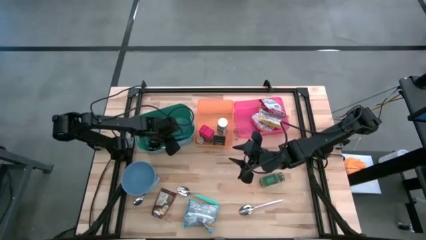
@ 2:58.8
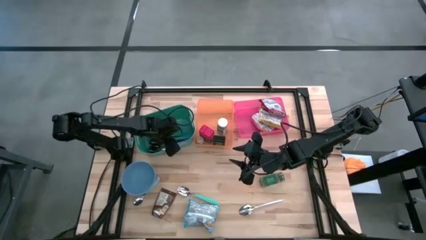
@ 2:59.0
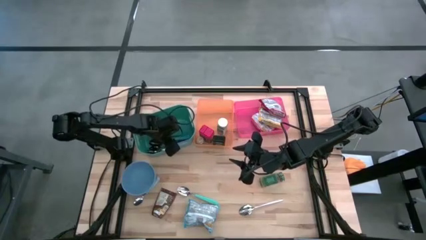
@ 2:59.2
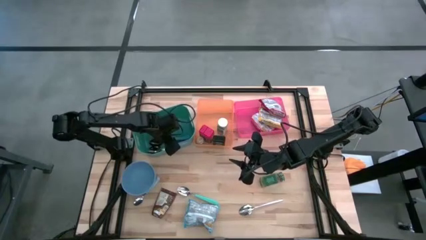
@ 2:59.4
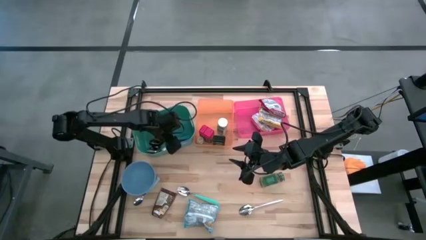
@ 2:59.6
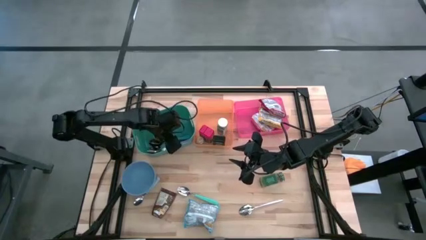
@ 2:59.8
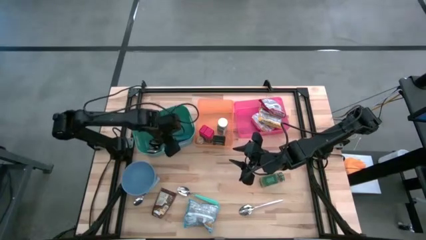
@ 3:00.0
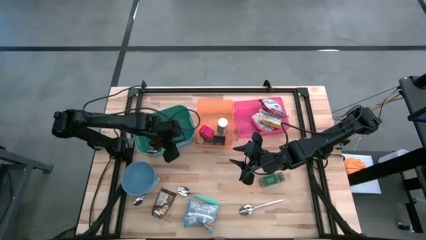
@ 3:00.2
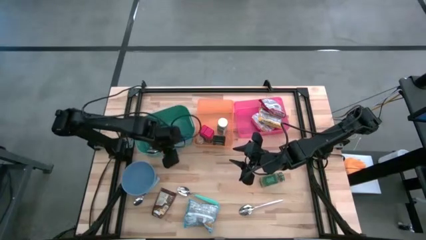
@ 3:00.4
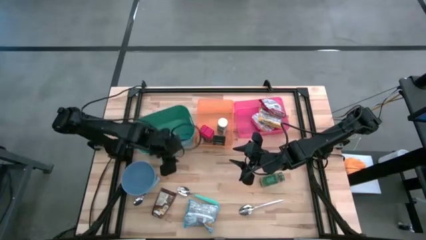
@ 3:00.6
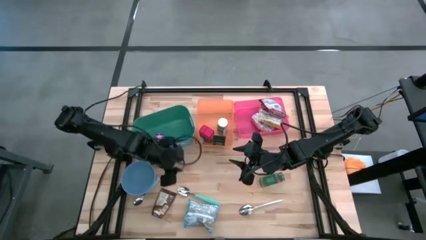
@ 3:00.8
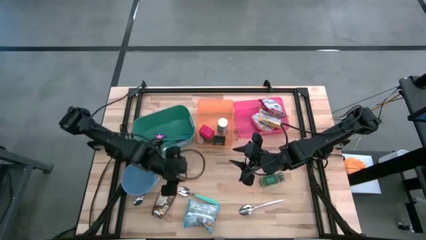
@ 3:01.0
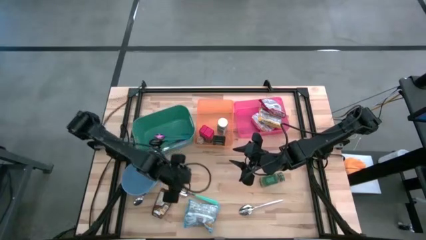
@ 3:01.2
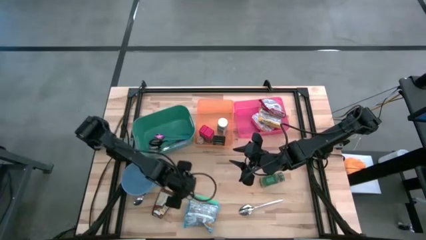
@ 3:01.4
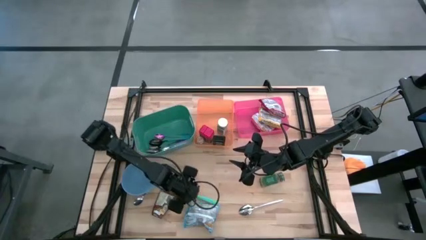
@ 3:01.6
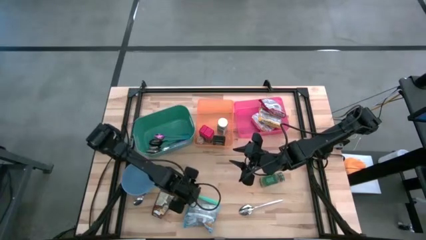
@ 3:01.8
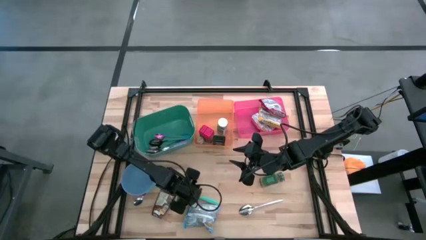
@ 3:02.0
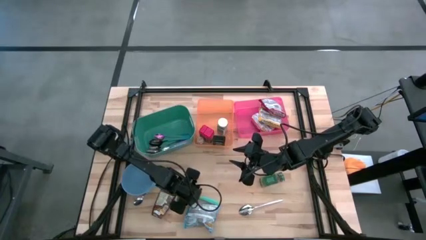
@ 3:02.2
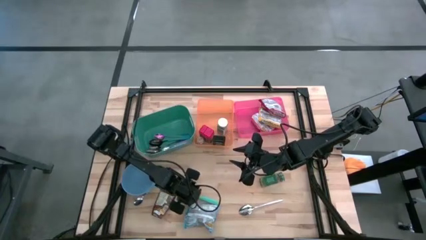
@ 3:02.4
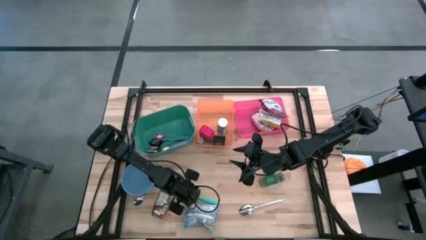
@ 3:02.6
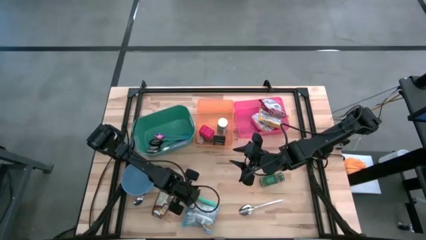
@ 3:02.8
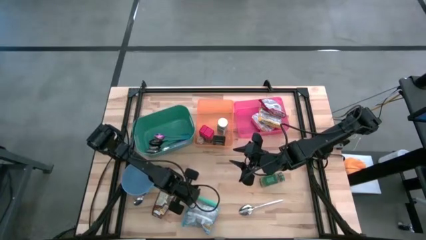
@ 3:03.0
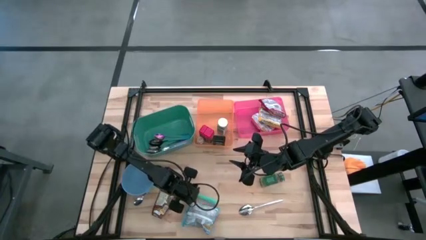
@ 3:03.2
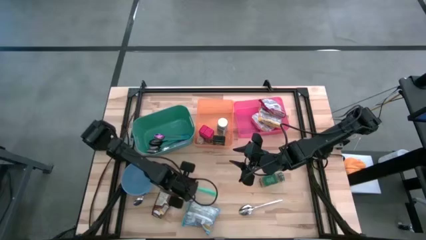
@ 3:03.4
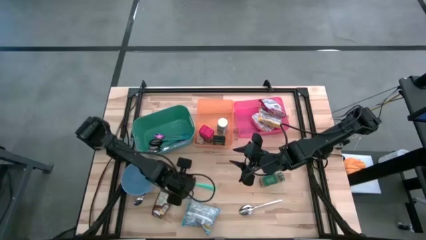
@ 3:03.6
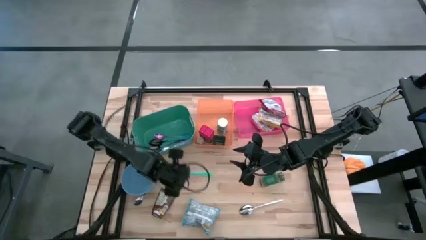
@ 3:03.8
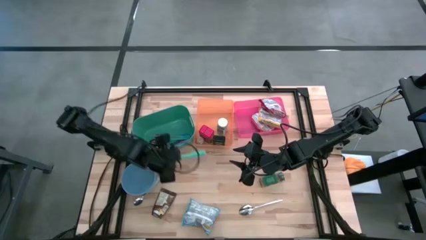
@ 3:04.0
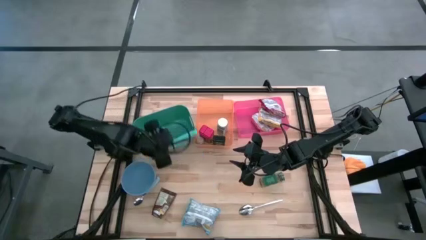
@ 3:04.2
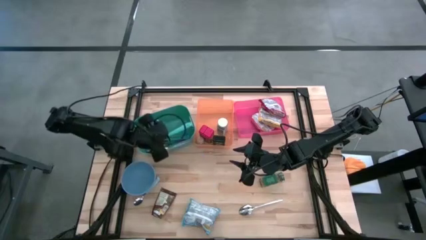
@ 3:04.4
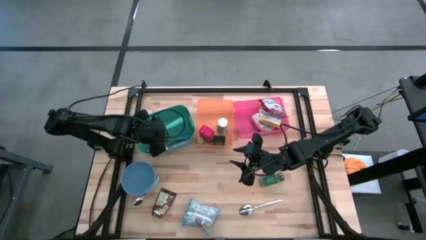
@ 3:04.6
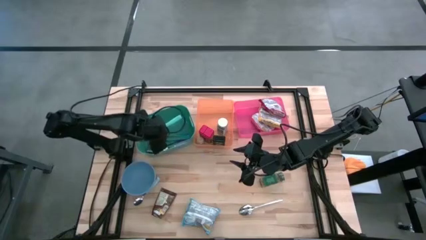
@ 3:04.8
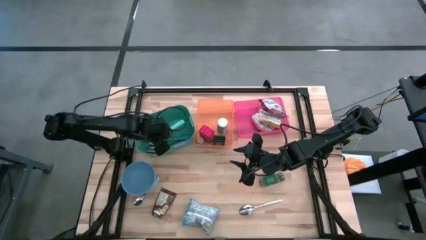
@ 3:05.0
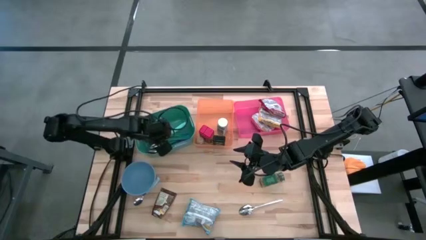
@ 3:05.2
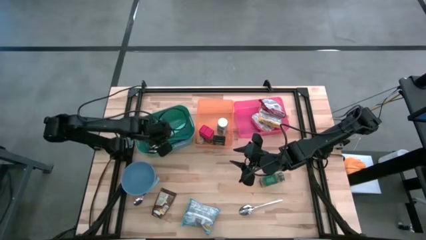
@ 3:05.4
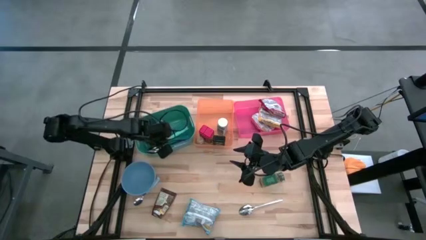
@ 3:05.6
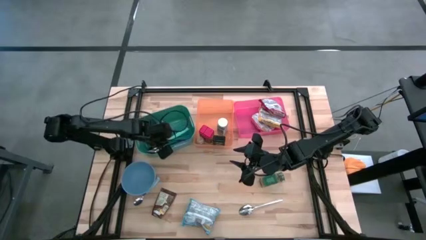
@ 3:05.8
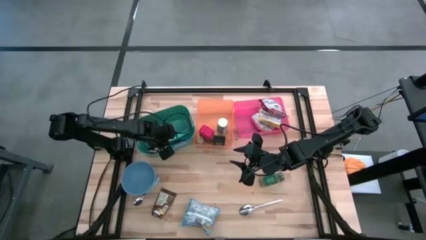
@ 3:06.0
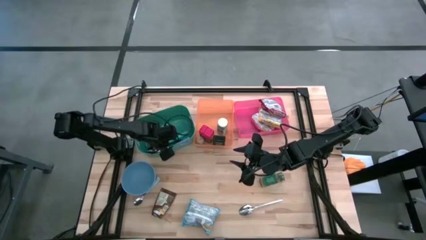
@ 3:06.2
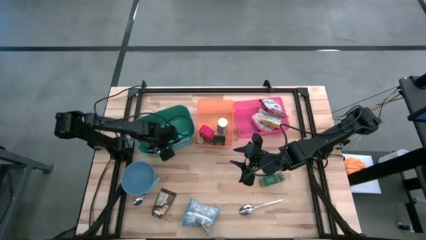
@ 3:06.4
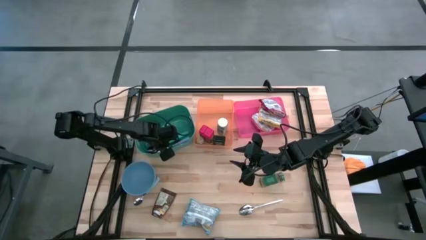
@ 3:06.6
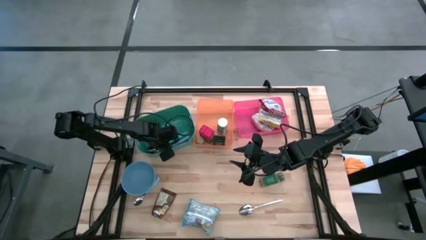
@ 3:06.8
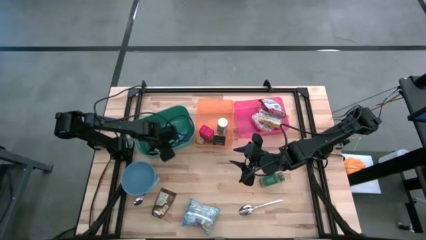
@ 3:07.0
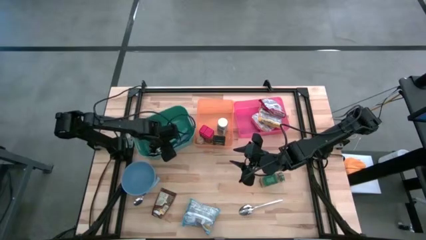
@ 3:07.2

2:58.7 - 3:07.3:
Put the light blue spoon into the green bin

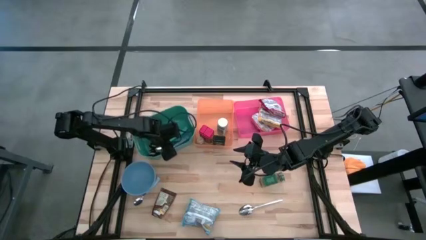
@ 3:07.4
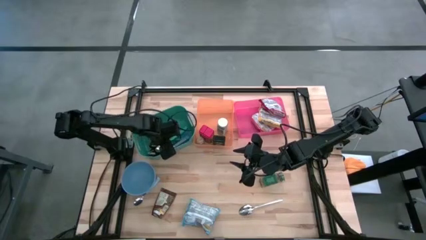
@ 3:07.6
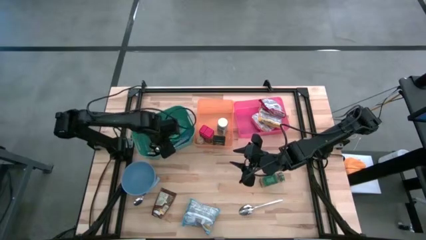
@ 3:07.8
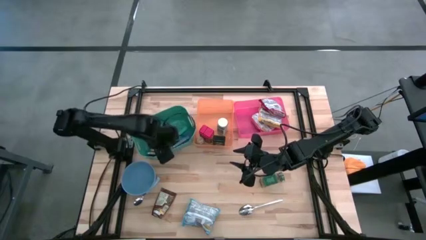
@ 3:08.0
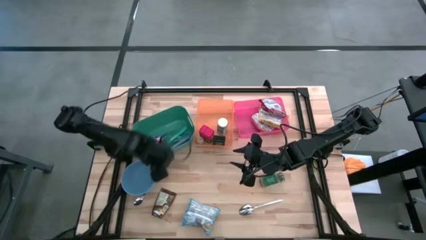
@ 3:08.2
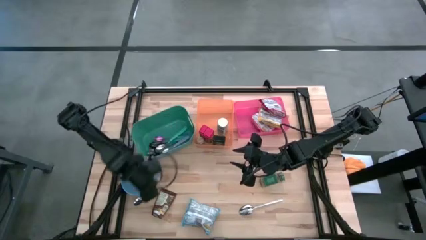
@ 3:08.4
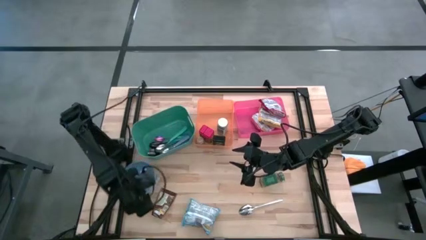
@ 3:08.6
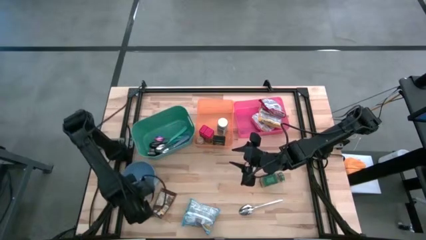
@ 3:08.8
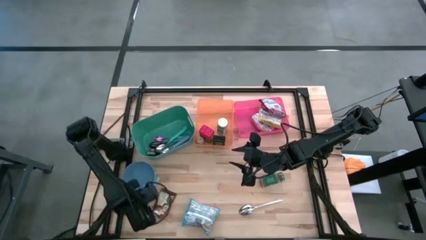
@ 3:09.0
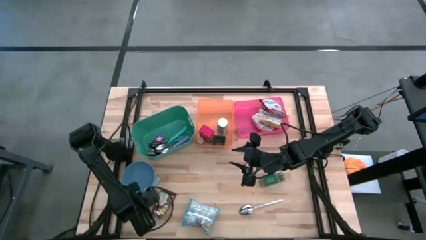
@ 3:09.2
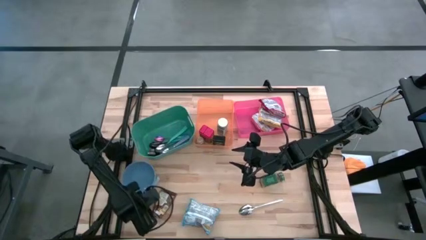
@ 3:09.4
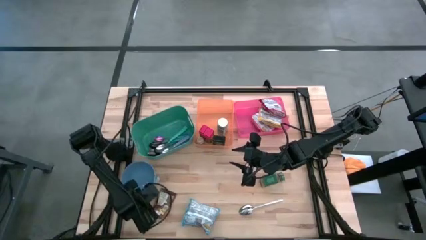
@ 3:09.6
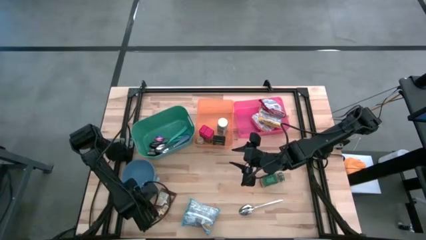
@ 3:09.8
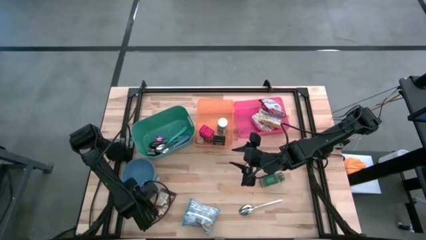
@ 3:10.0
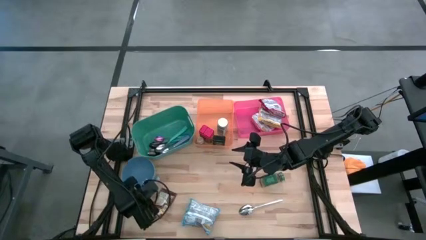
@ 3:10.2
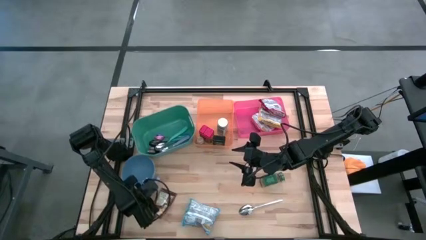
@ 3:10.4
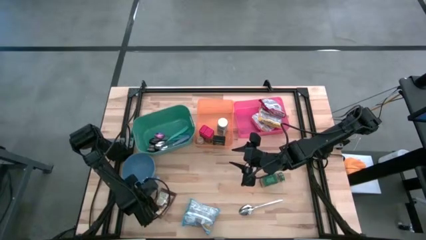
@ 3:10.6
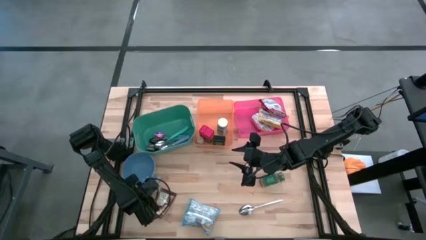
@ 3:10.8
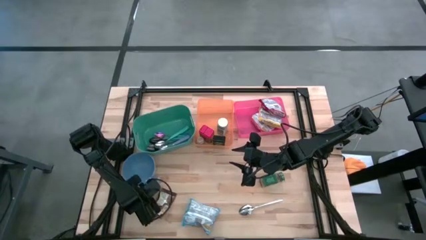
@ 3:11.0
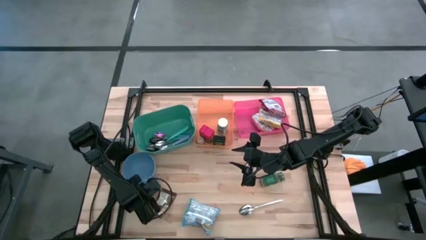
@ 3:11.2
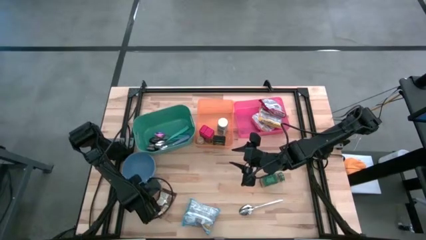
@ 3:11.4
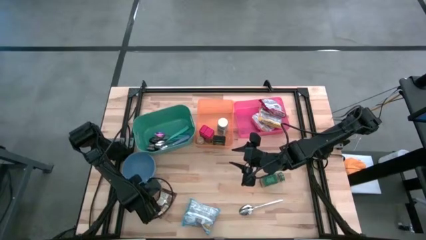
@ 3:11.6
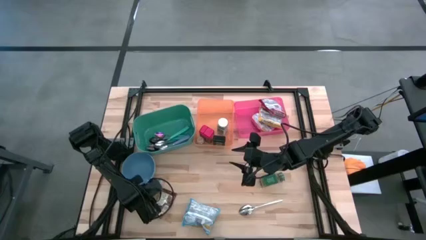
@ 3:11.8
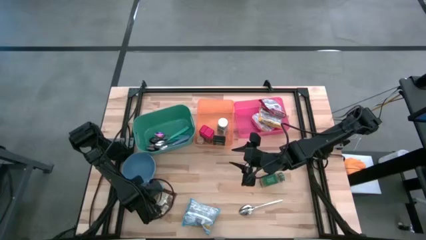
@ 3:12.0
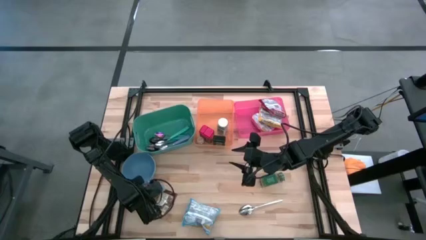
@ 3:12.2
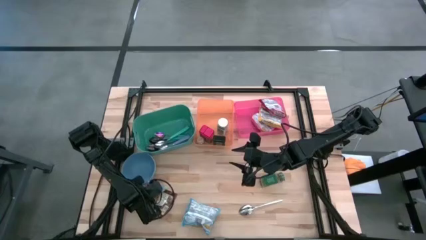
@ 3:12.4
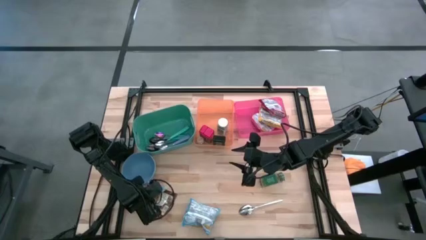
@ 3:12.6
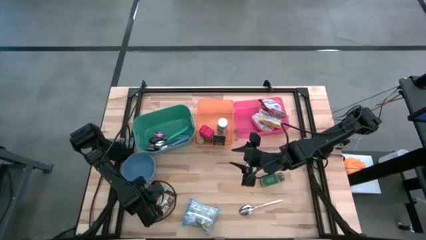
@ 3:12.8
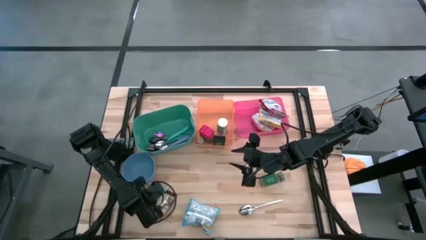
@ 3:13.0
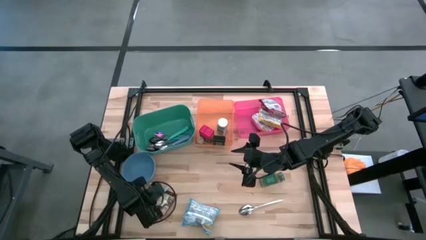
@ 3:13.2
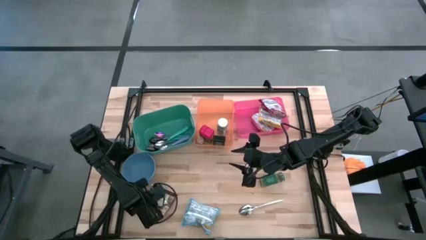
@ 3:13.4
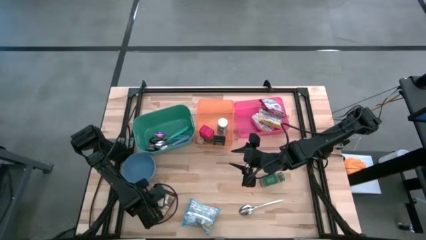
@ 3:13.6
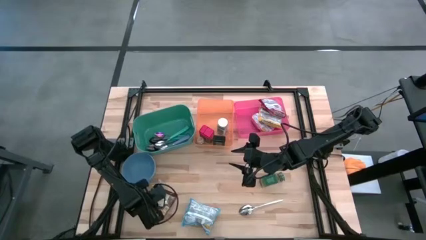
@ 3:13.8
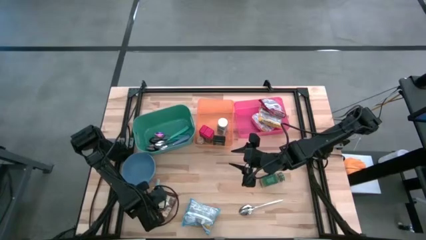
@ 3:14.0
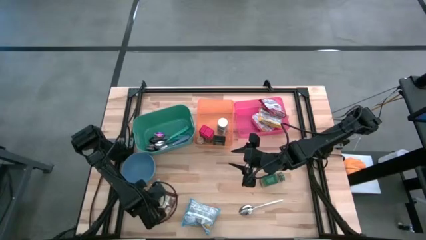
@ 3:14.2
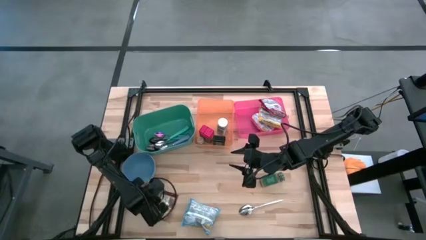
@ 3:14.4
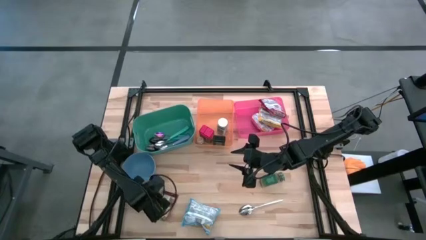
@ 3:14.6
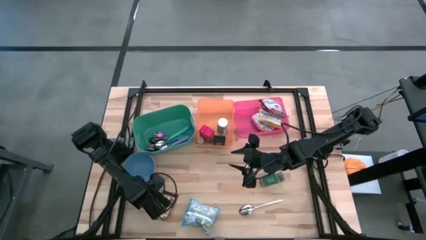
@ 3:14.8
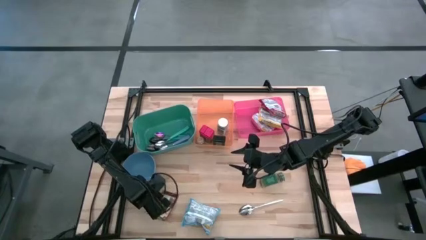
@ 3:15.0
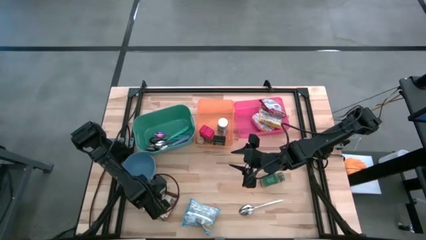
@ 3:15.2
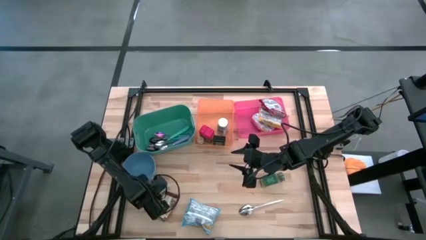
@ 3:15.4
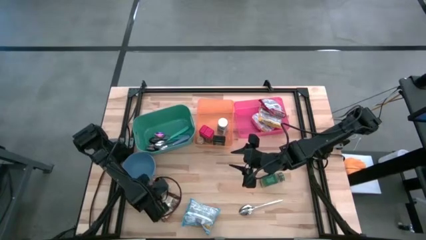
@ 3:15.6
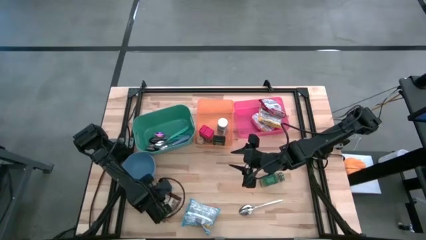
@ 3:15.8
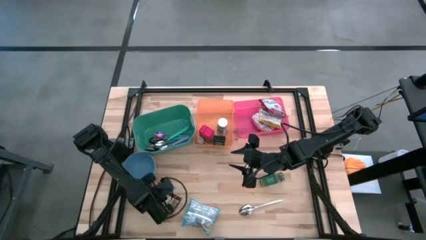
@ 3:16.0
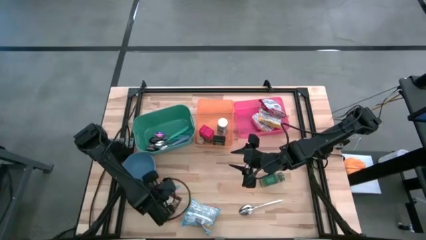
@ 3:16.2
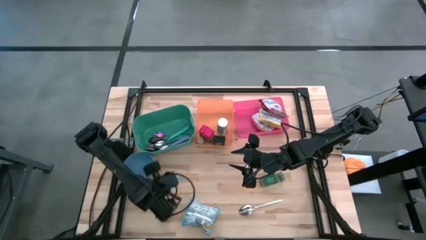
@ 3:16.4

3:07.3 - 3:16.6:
Put the dark blue spoon into the green bin
